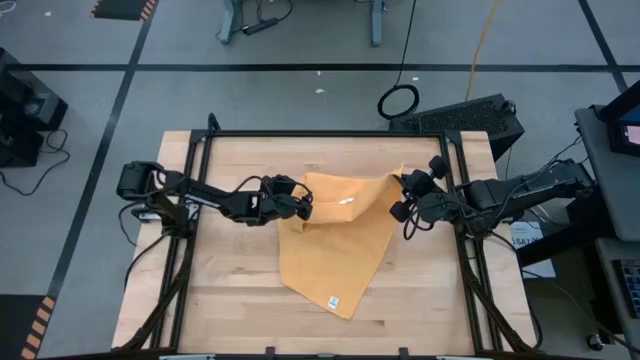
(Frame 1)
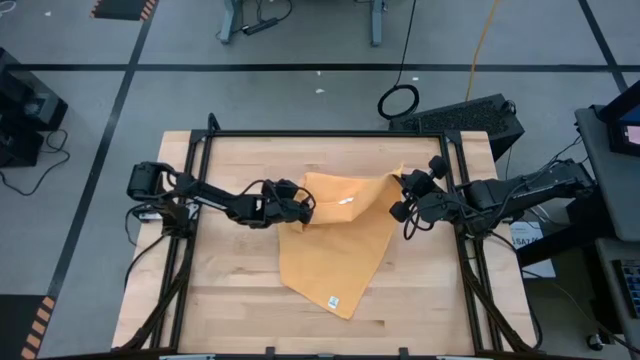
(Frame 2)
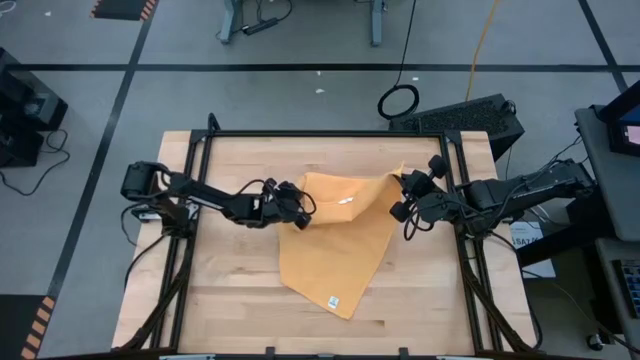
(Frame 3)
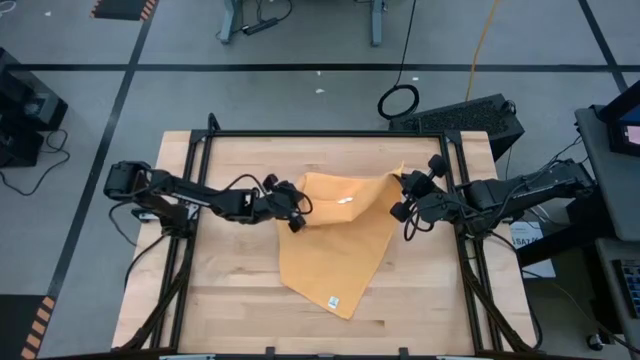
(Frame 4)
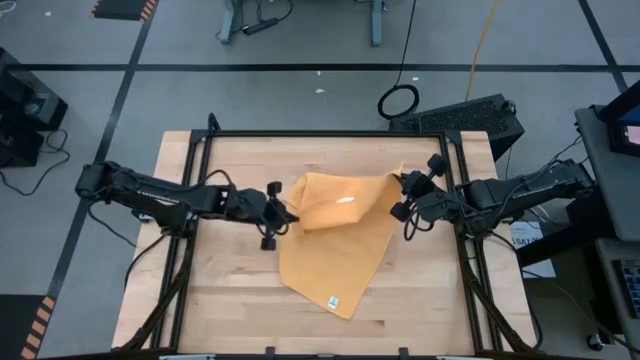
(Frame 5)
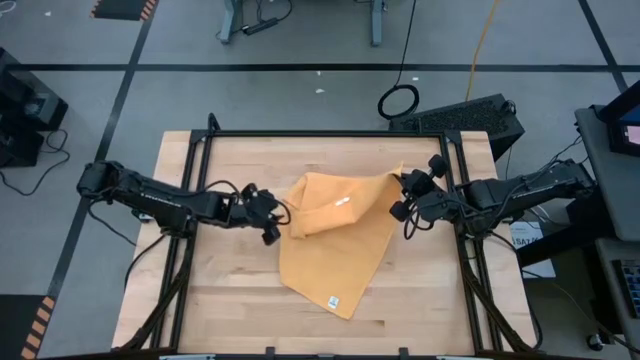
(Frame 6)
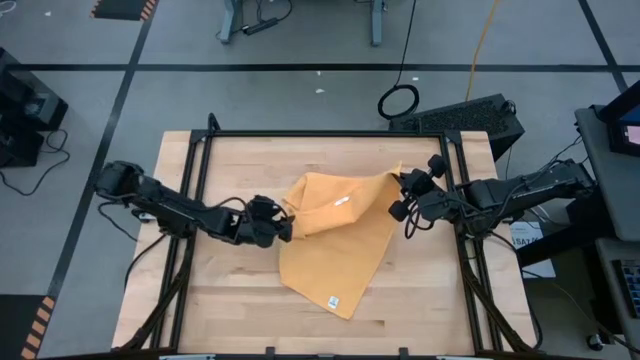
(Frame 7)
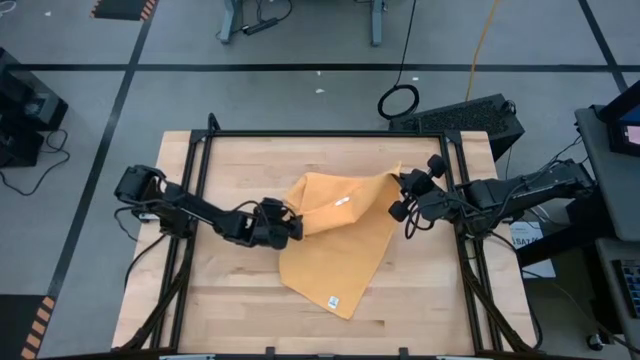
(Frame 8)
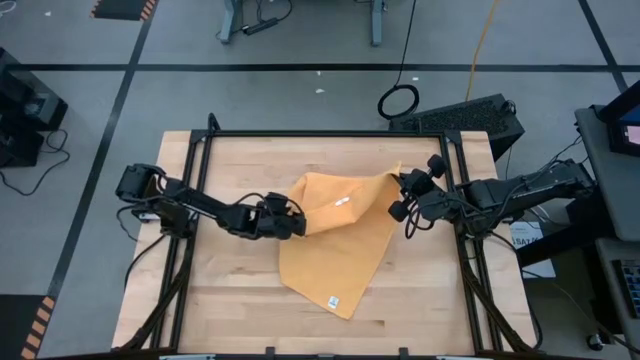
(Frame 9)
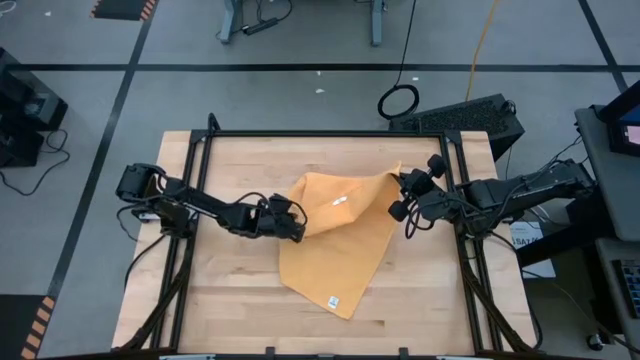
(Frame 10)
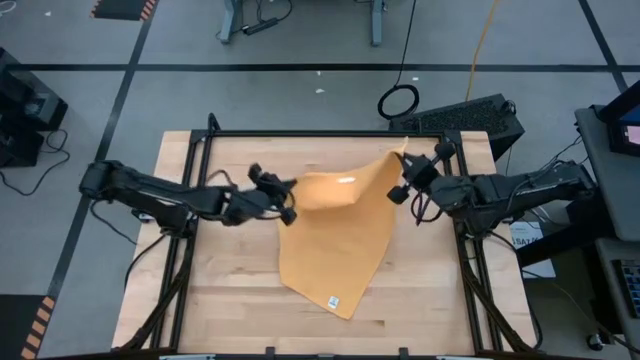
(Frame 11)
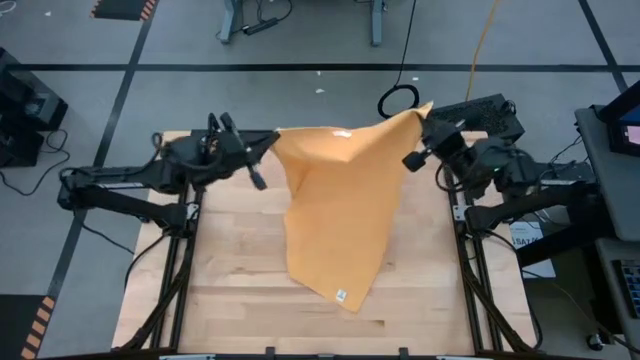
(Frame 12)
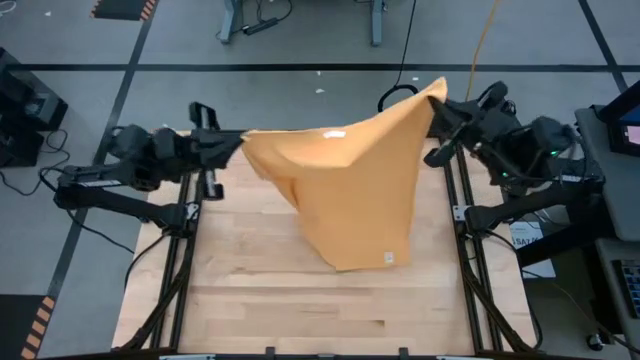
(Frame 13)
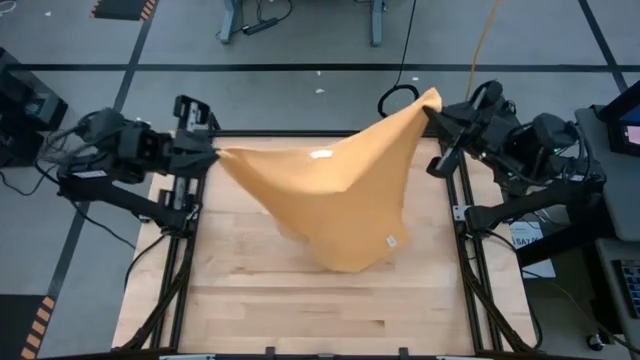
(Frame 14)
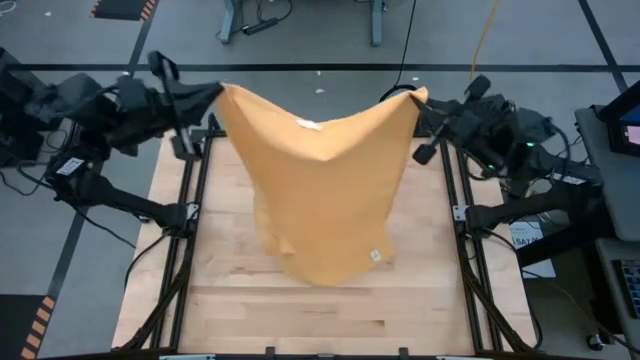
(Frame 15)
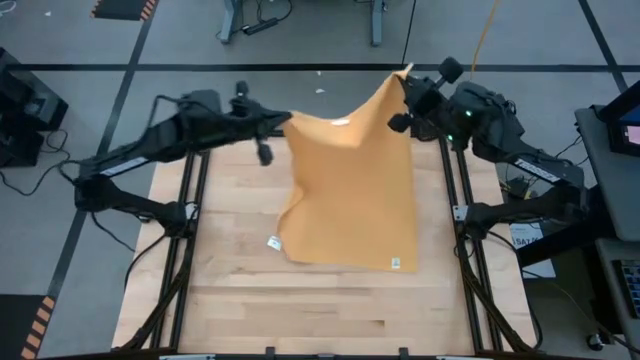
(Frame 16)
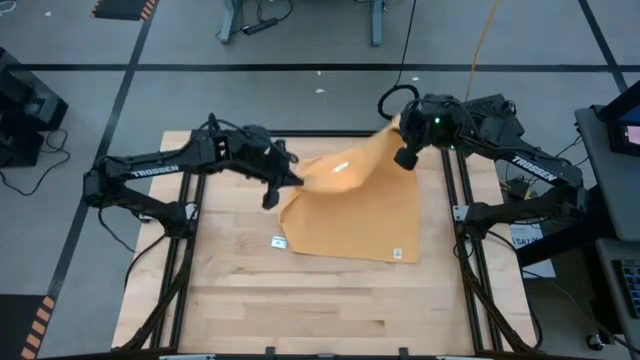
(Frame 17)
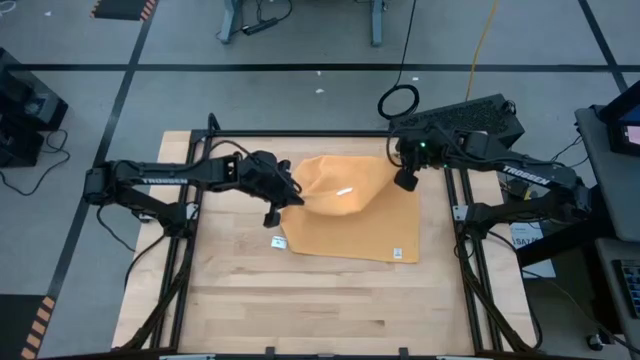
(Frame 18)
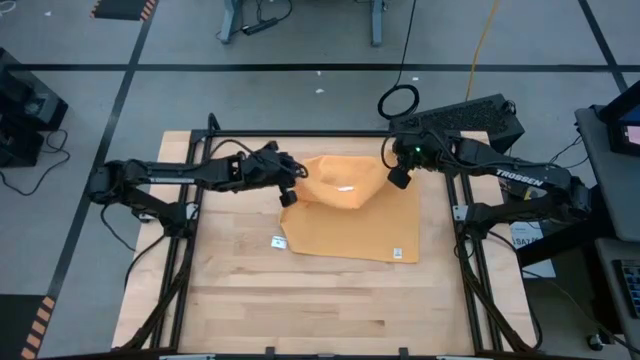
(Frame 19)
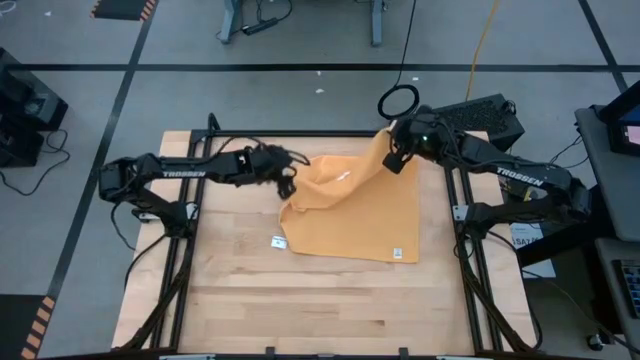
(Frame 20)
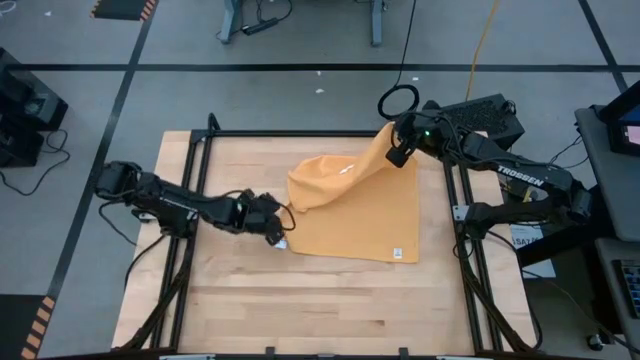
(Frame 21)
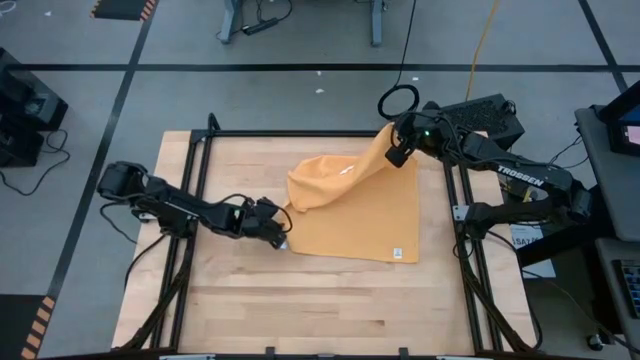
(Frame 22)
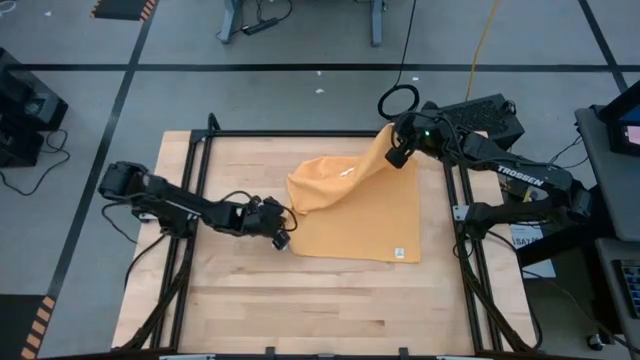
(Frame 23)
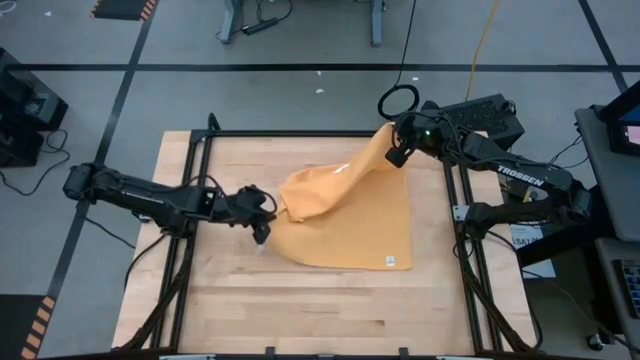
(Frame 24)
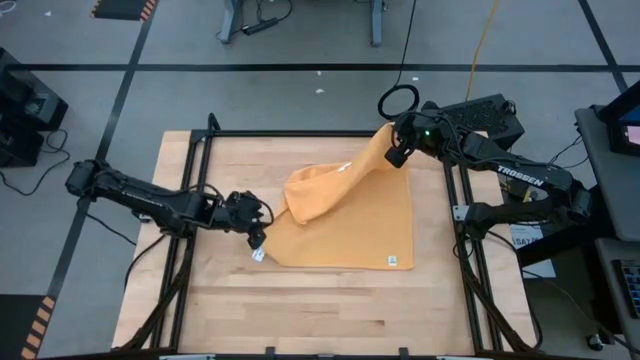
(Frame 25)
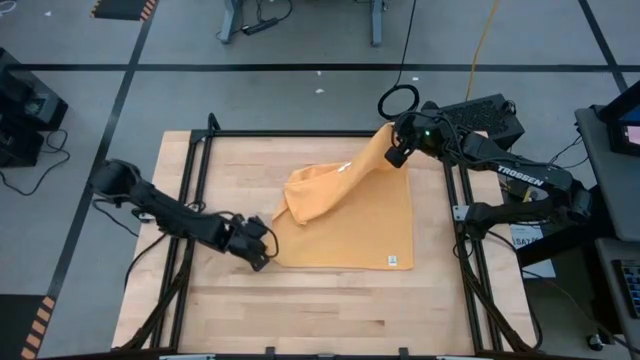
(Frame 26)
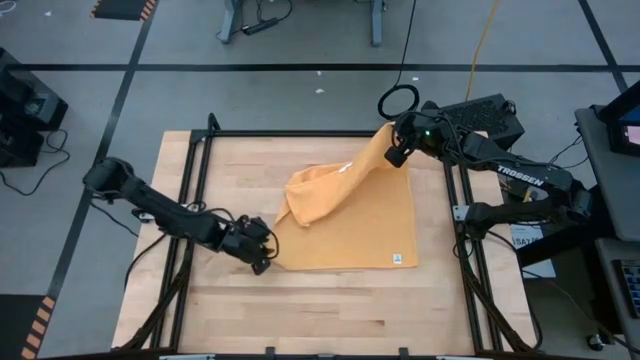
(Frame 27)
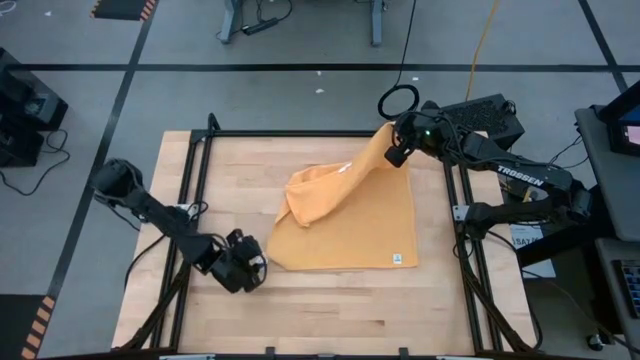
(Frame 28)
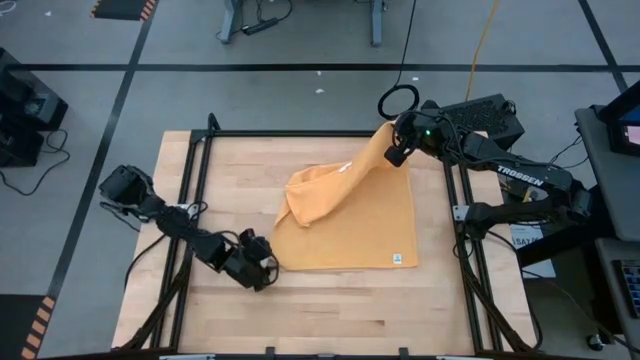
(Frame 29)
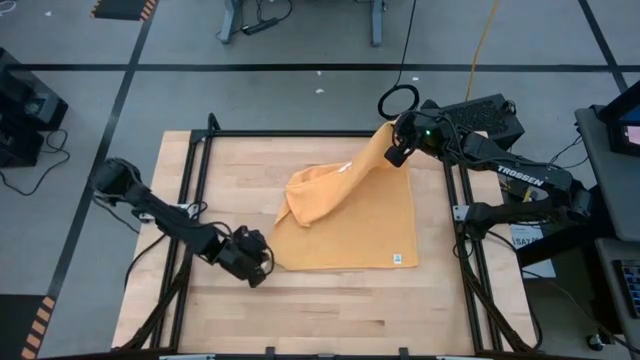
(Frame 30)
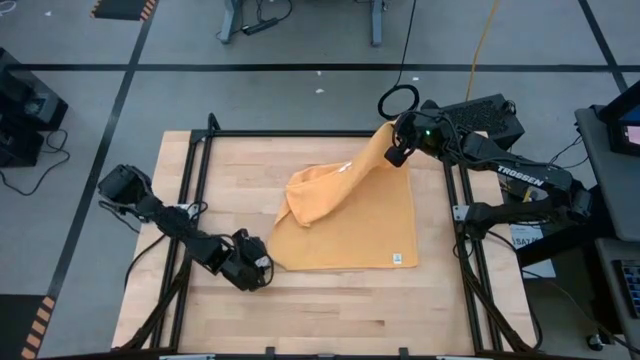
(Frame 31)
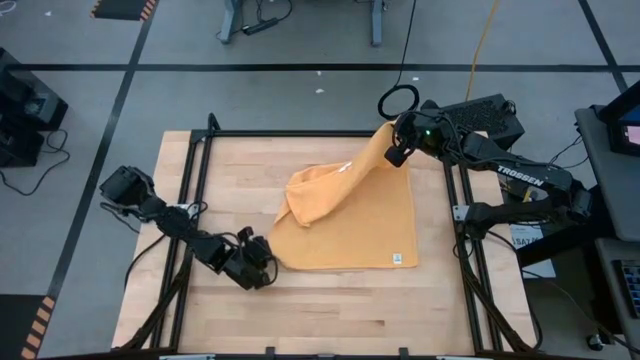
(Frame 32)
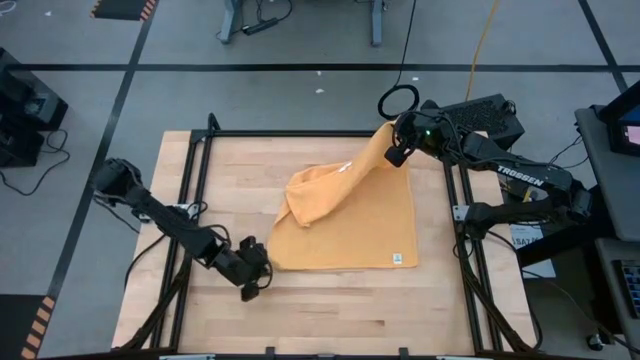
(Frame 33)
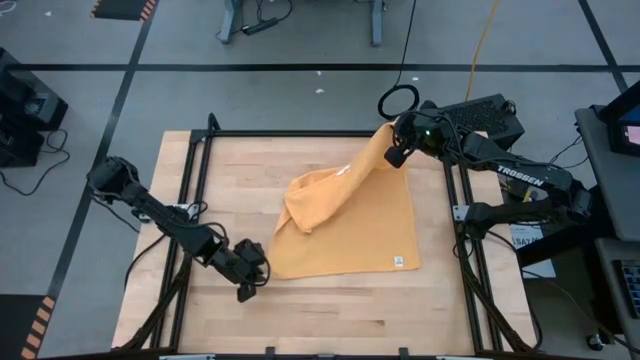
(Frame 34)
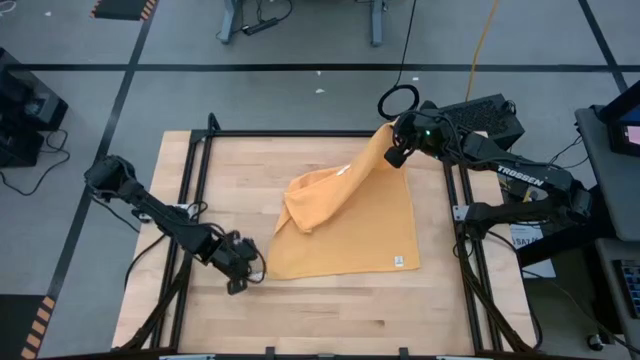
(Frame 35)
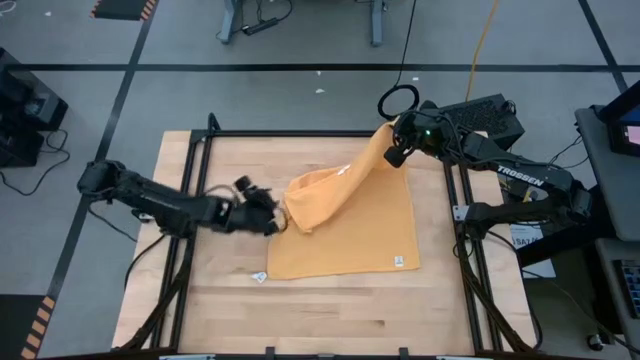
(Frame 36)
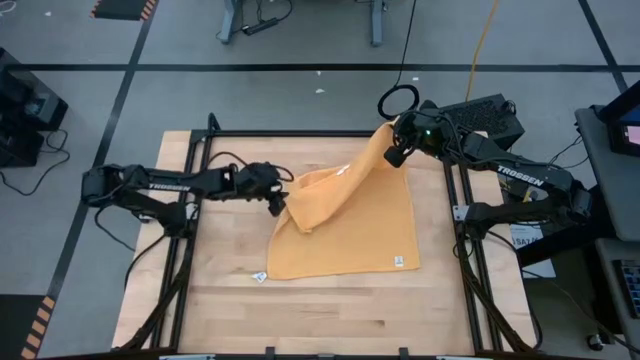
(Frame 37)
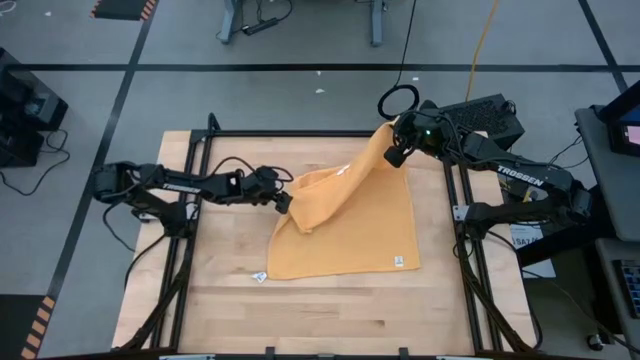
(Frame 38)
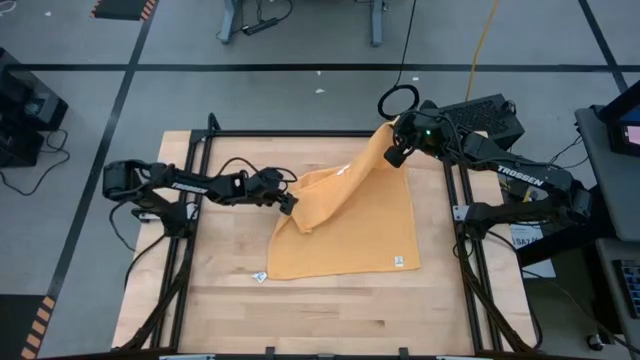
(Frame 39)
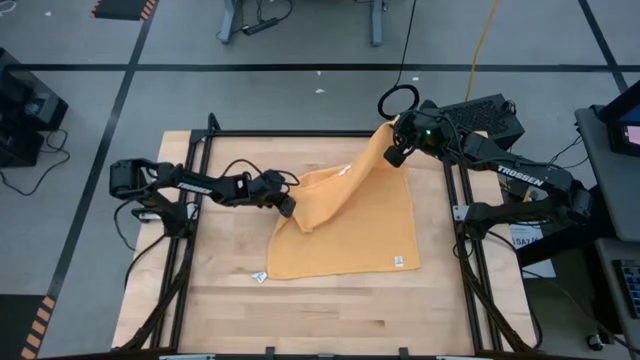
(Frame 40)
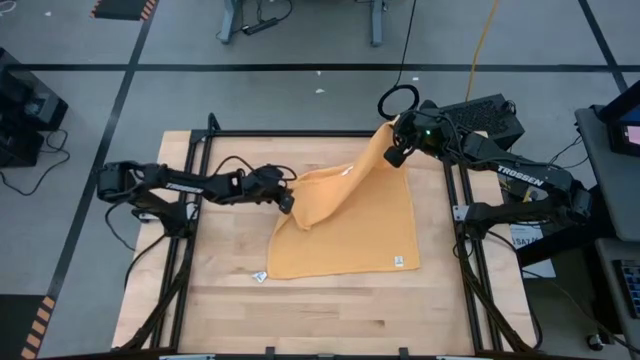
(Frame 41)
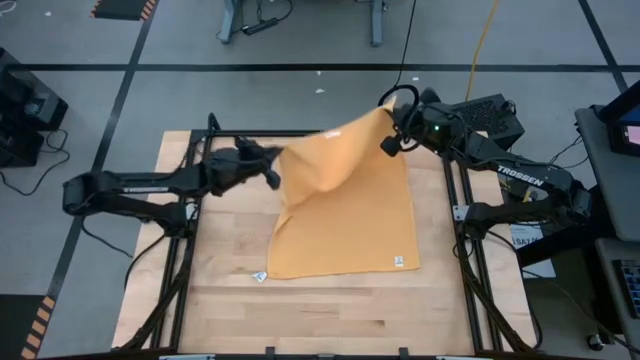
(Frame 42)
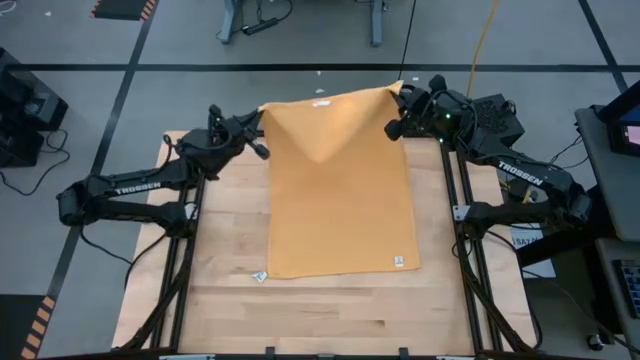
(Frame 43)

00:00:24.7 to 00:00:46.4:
Task: Roll towel
Fold the yellow towel in
